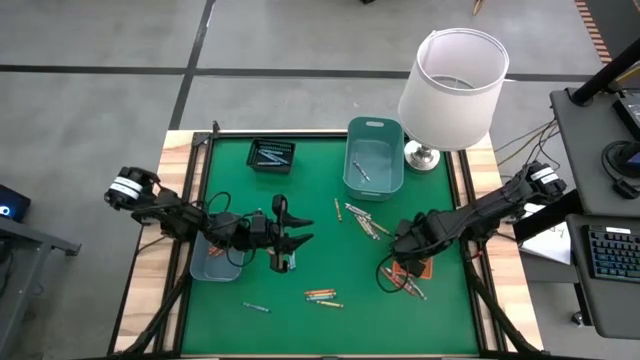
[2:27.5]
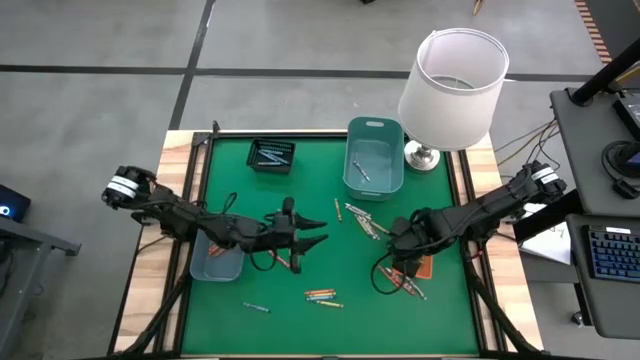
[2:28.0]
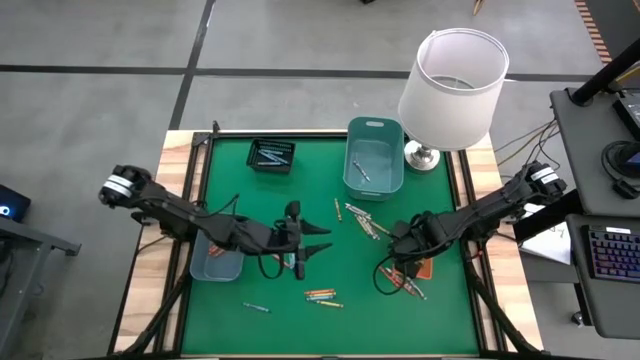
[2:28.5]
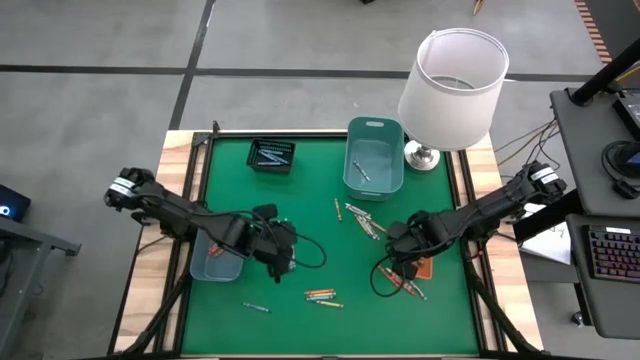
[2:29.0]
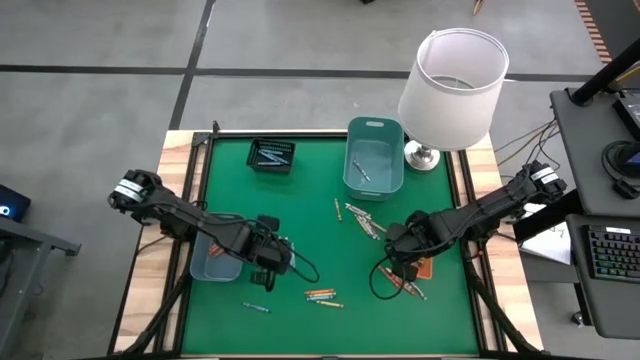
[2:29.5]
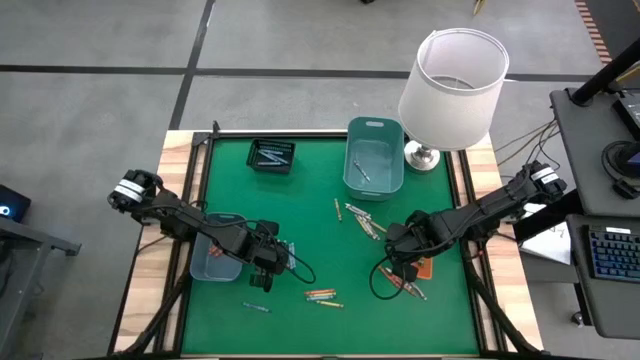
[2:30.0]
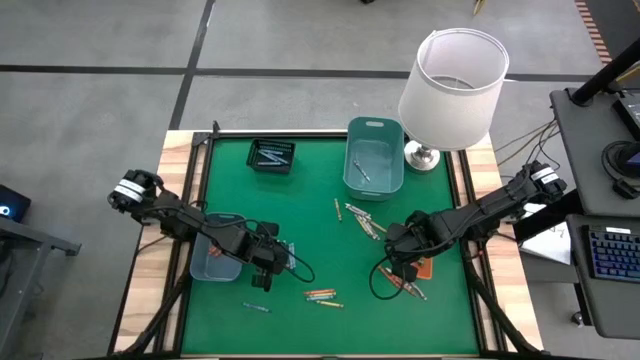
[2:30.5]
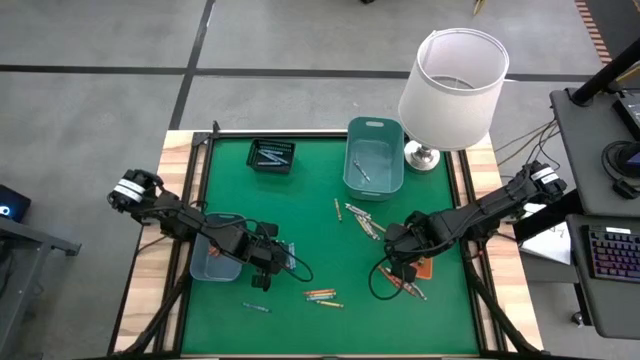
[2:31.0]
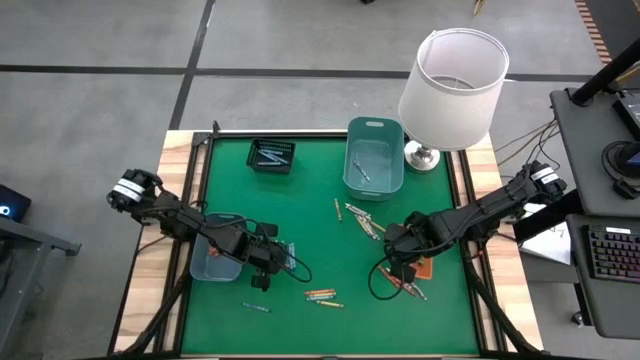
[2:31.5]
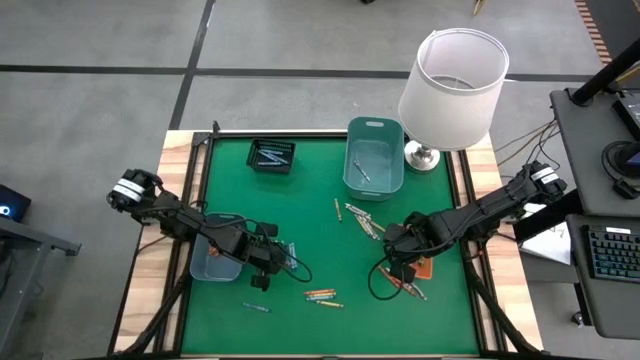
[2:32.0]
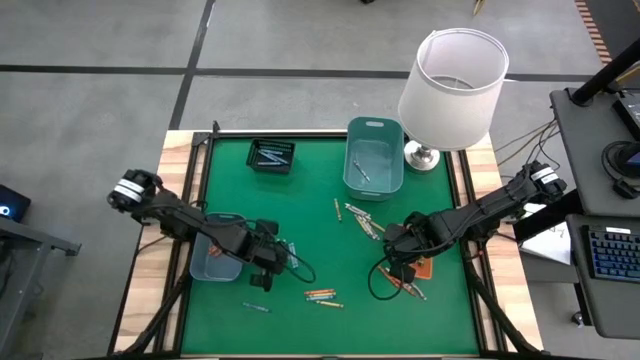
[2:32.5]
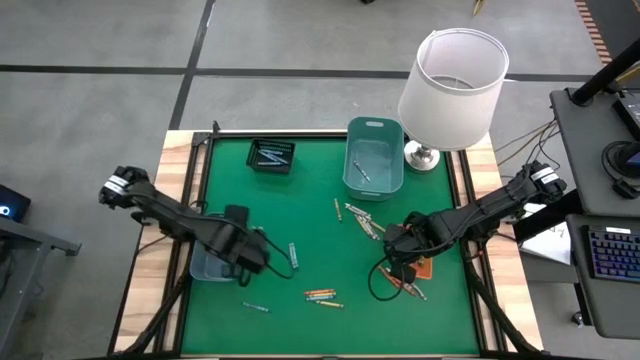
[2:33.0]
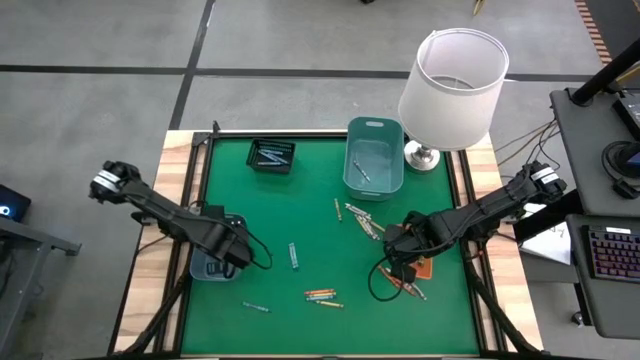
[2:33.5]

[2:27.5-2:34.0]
Task: Sort crayons
Put the orange crayon into the blue bin

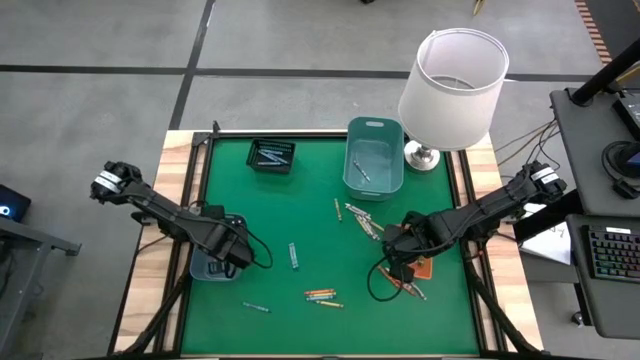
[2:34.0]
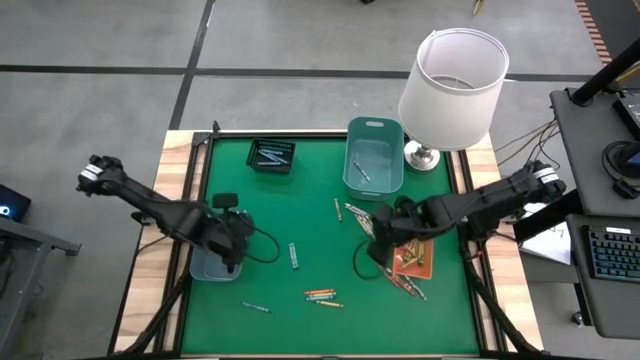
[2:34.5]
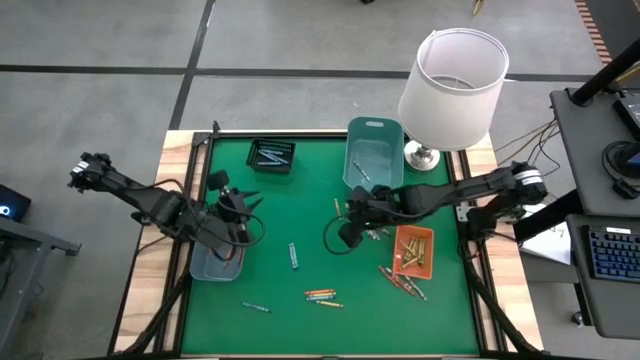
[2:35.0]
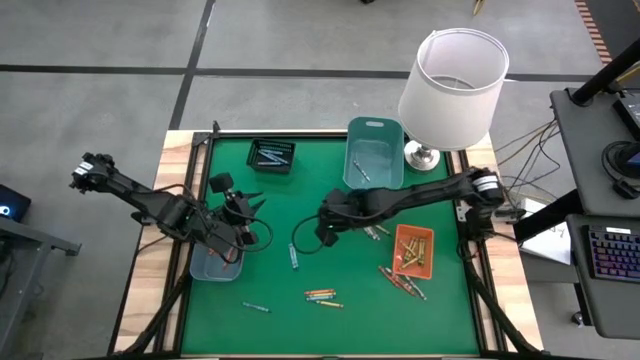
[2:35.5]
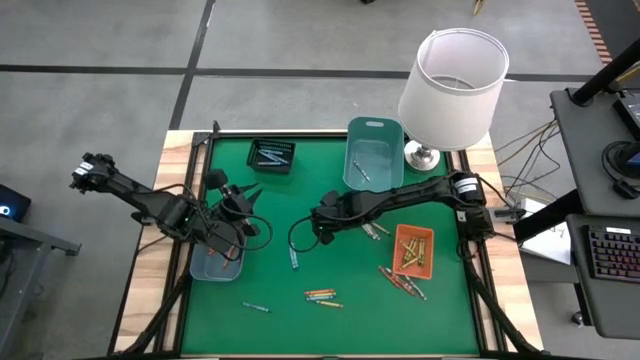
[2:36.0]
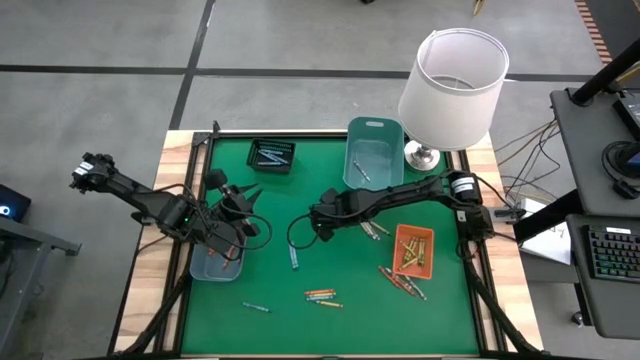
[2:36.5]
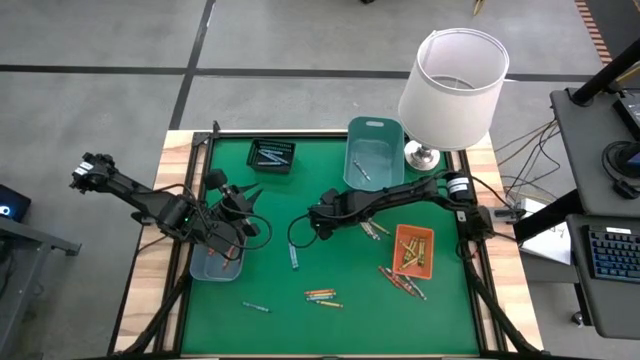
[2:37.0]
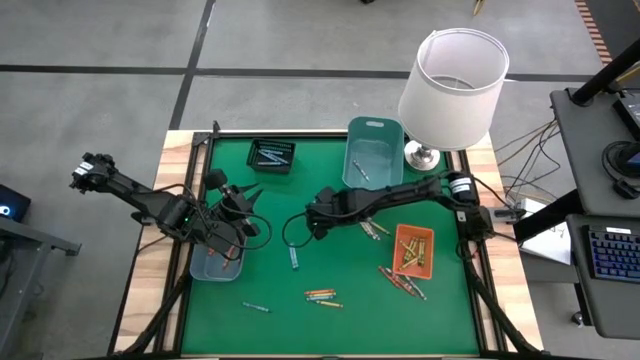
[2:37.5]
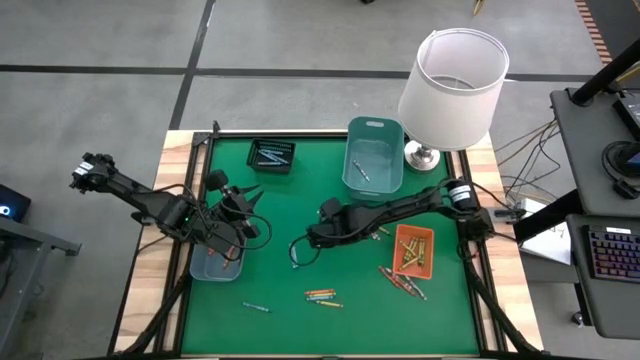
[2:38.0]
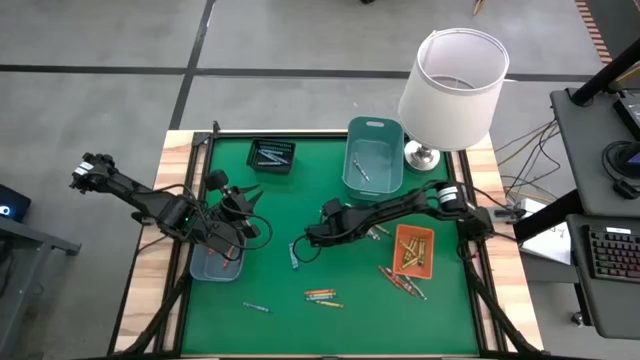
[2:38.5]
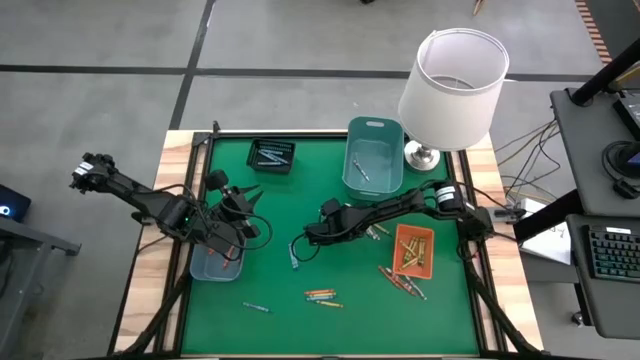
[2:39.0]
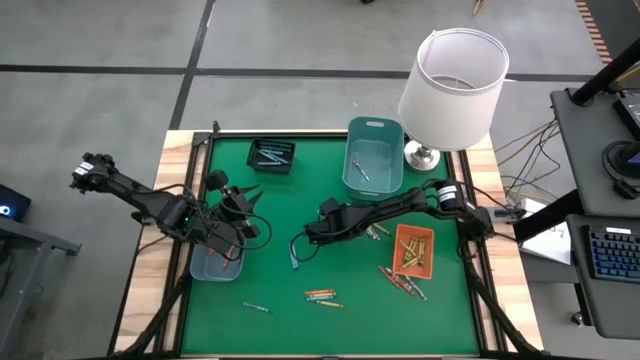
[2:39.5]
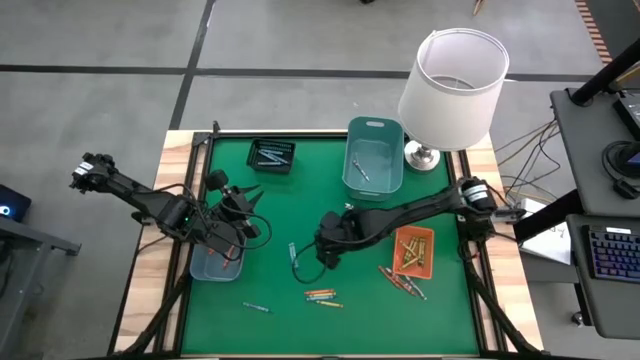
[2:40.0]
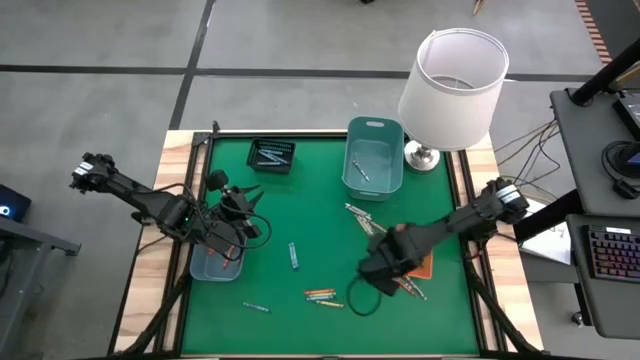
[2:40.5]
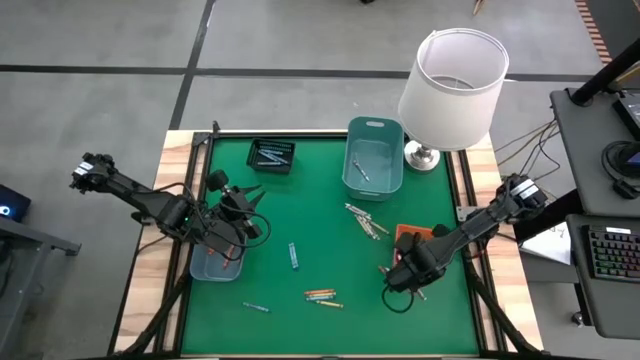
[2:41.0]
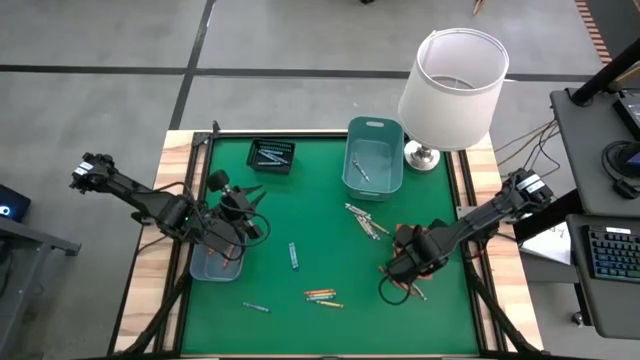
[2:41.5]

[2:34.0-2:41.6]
Put the green crayon into the orange bin

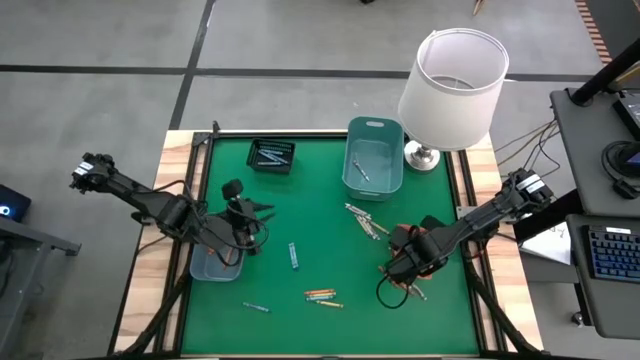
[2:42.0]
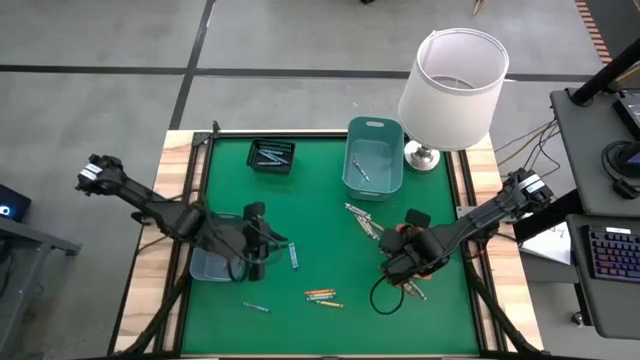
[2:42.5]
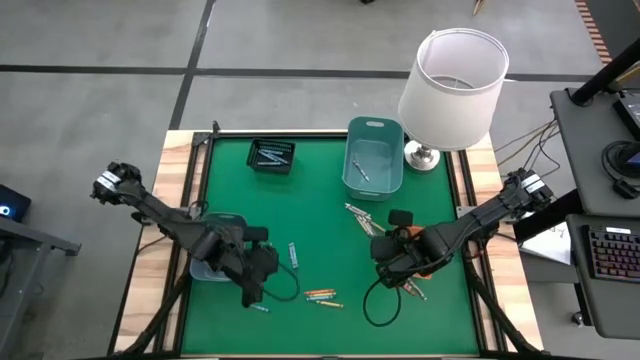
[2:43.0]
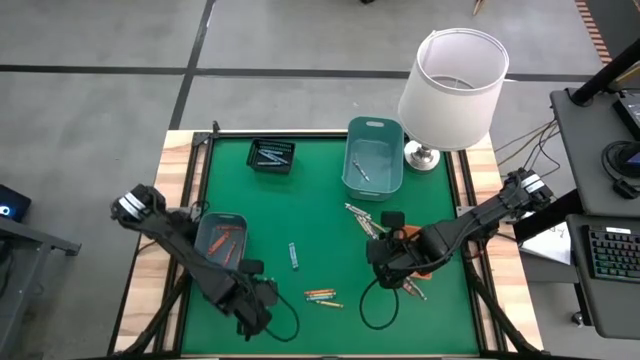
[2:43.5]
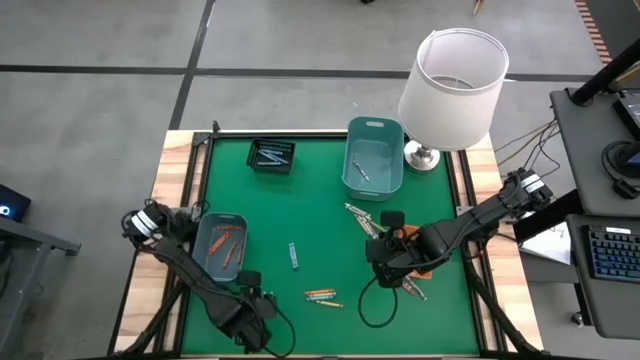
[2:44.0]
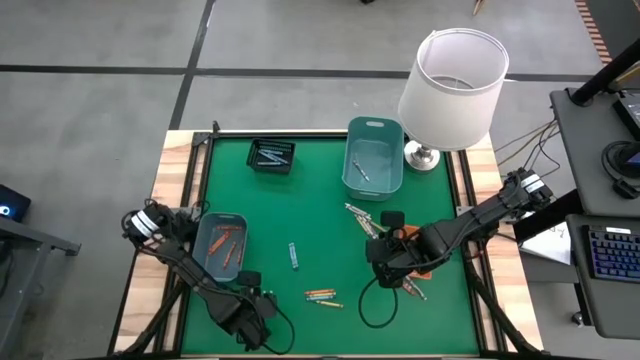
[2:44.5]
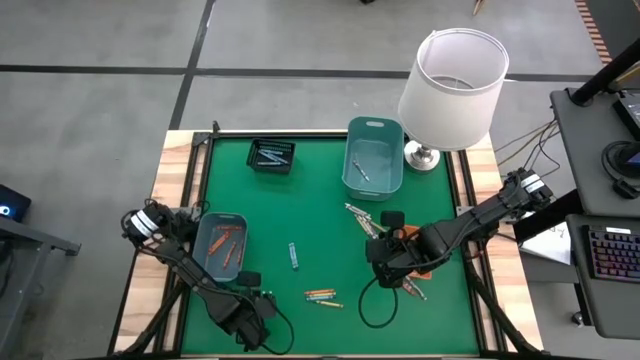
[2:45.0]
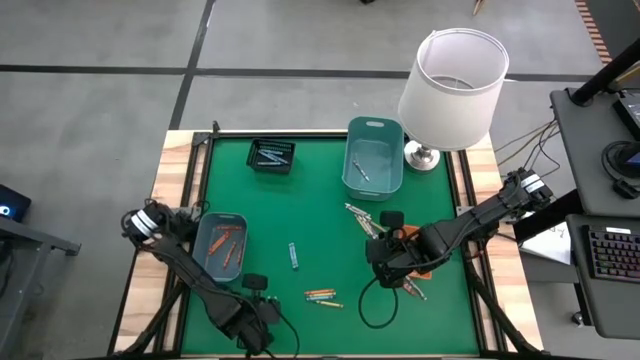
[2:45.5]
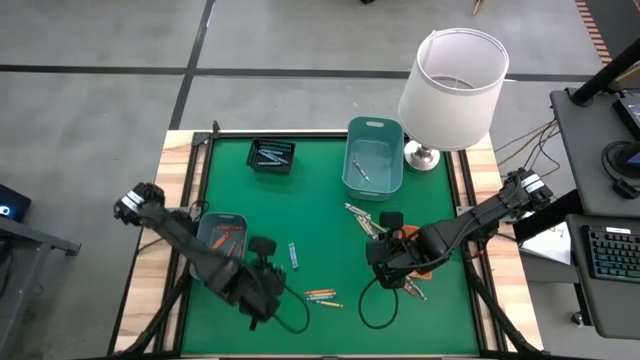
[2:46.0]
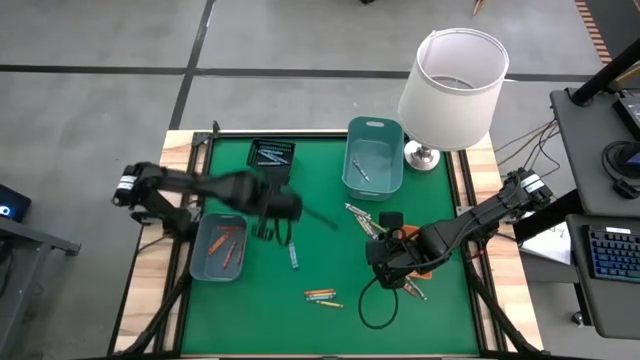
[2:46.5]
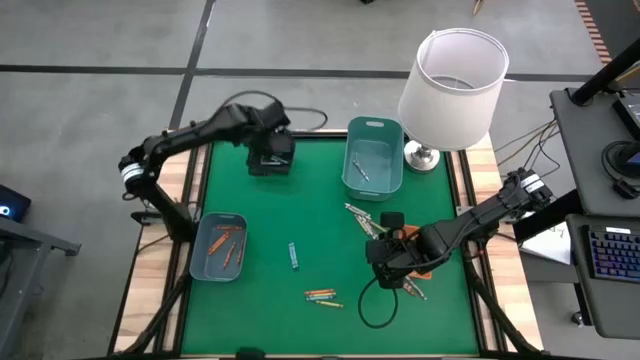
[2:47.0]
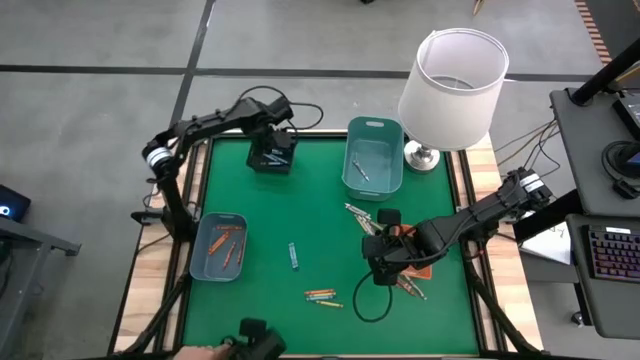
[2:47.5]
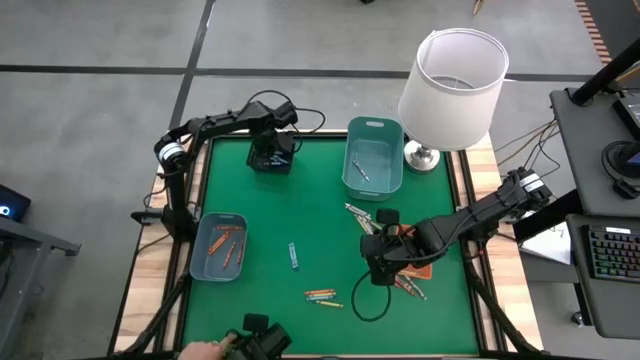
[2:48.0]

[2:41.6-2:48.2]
Put the blue crayon into the black bin
